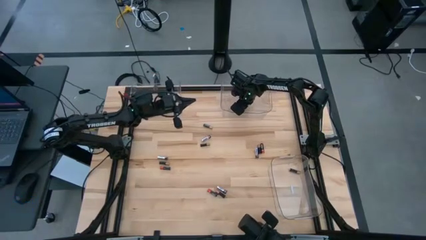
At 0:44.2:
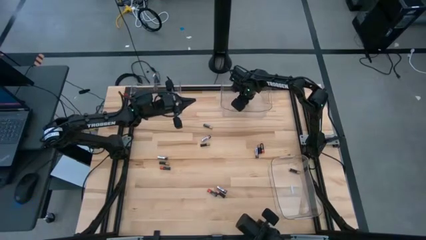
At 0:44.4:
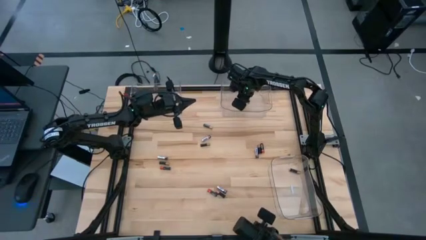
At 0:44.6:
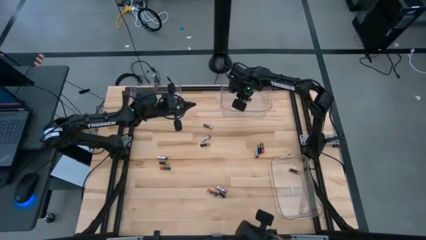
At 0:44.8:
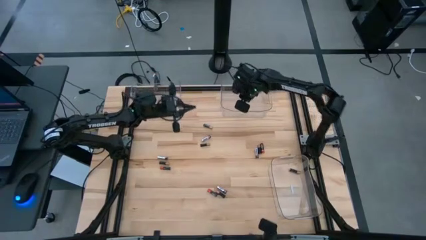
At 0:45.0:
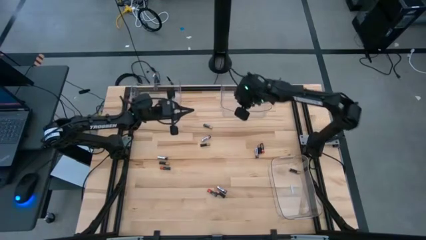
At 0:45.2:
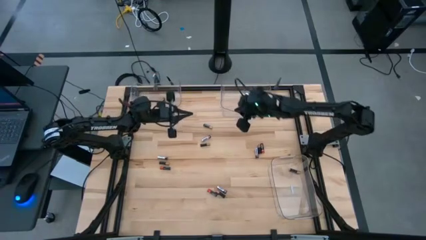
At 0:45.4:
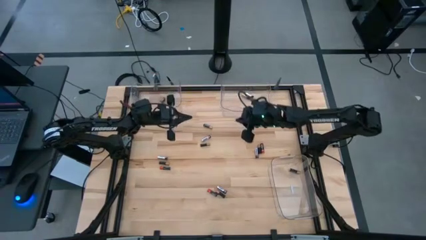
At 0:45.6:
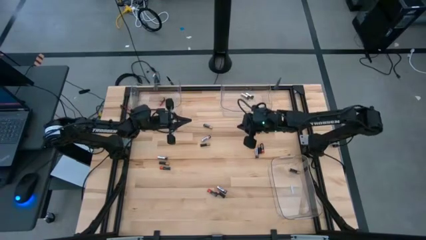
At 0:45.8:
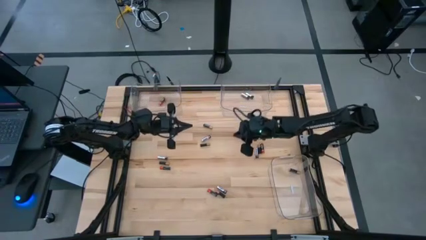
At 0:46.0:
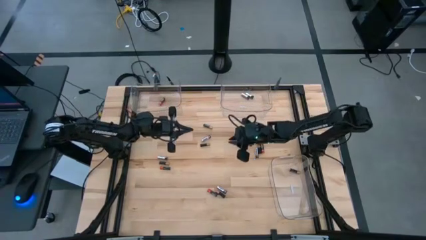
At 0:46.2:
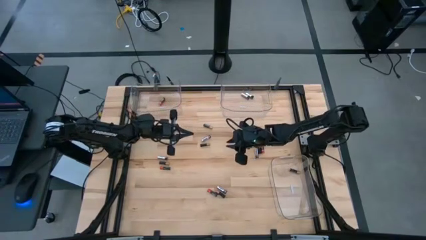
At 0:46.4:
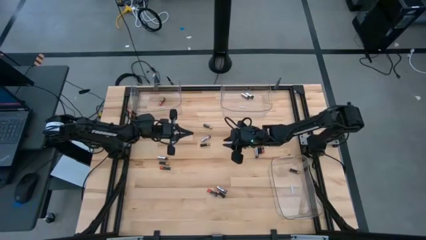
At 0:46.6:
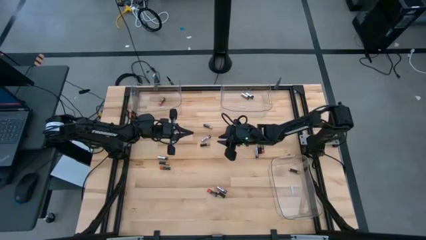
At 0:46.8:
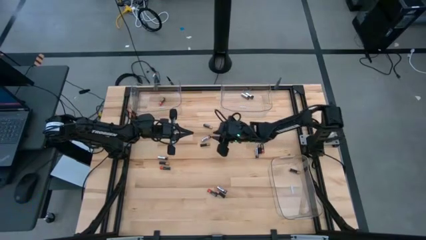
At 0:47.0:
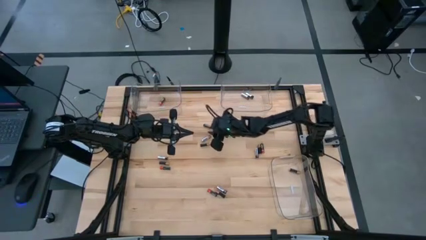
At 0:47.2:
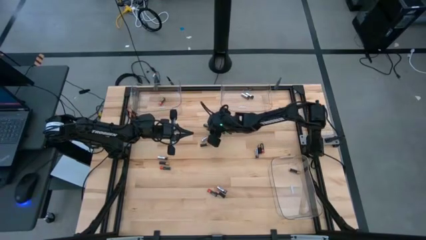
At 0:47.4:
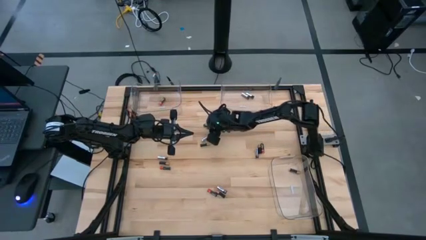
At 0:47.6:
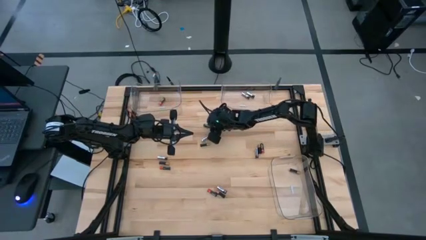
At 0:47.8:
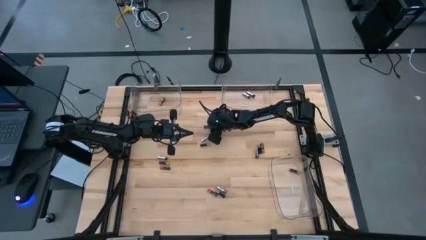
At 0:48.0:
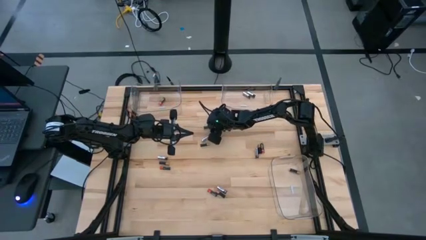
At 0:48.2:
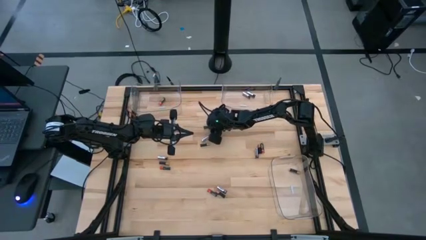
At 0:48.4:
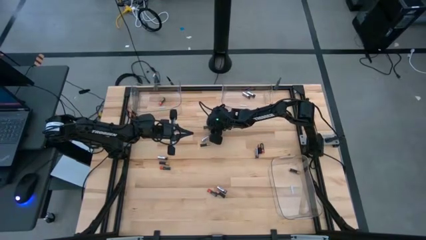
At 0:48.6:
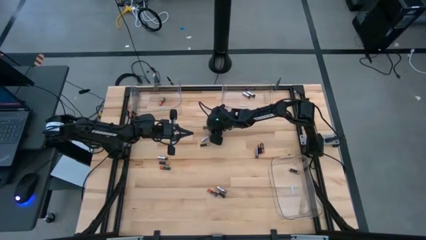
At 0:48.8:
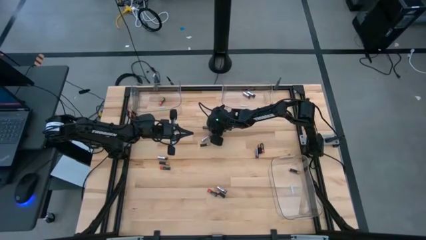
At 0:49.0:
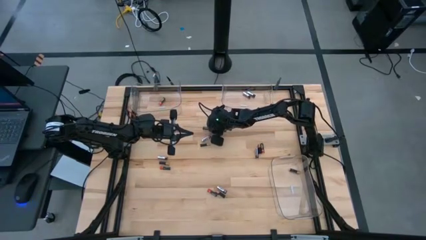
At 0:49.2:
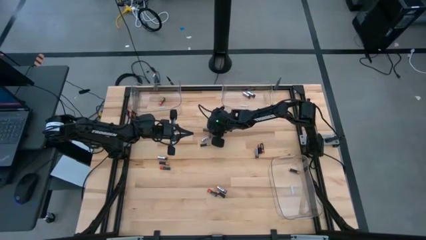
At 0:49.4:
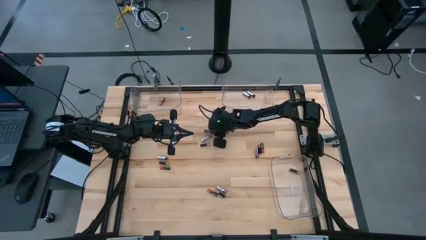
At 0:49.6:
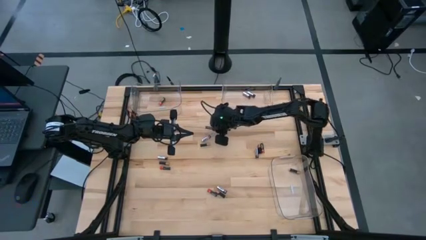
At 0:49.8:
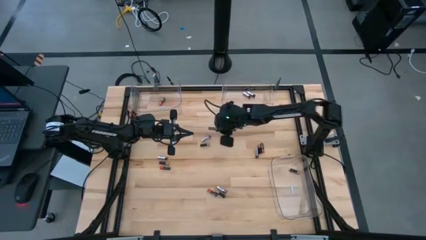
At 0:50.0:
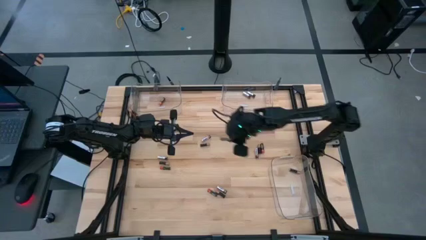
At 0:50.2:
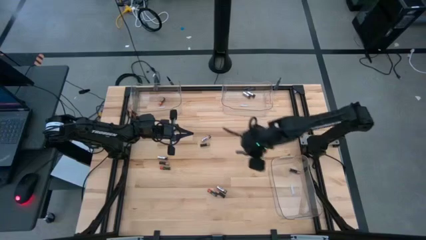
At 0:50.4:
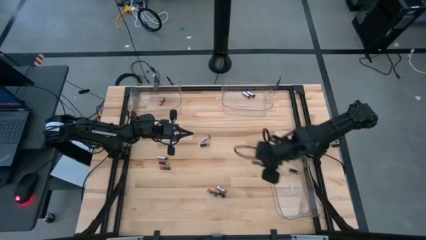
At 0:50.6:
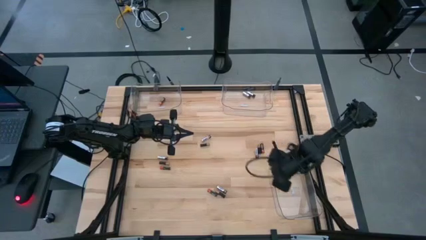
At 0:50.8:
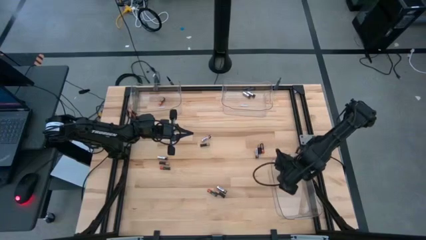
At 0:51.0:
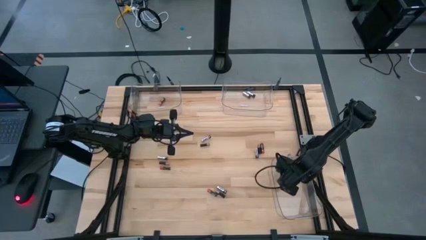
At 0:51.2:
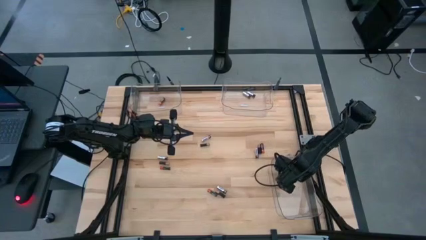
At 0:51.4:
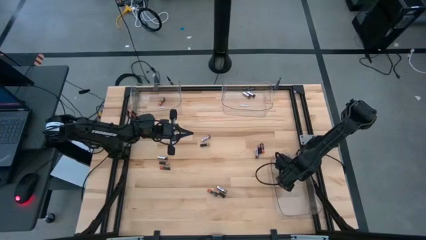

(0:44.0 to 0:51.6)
Task: Sort batteries
Put the brown battery into the bottom right transparent bin

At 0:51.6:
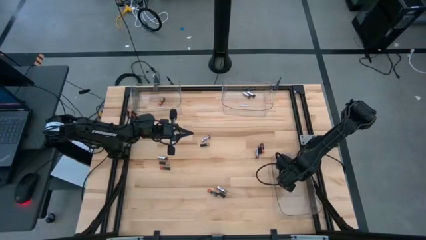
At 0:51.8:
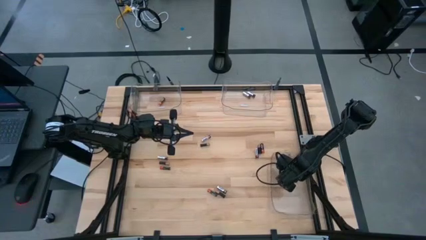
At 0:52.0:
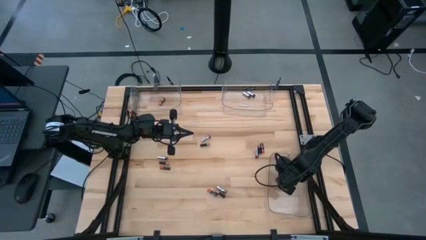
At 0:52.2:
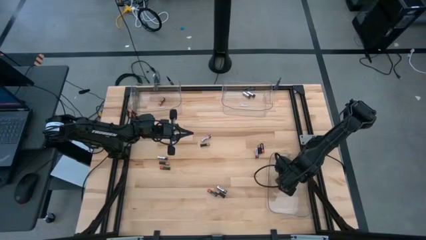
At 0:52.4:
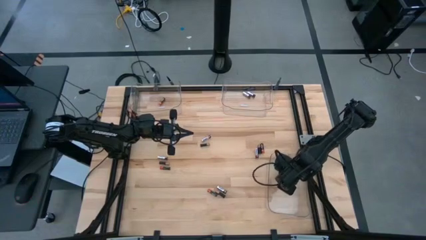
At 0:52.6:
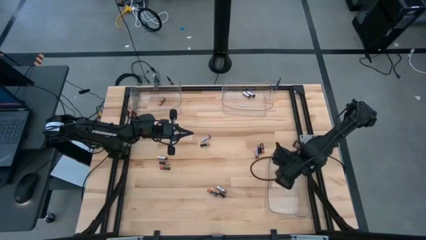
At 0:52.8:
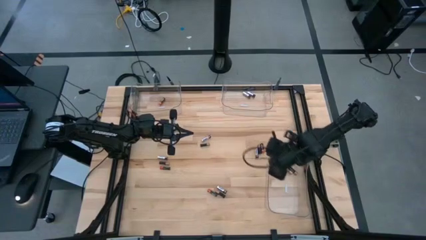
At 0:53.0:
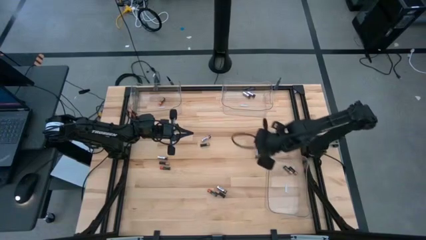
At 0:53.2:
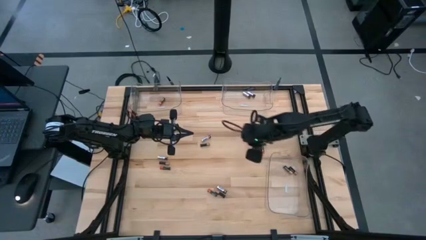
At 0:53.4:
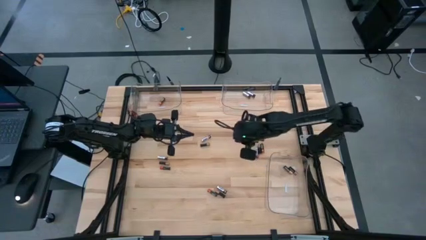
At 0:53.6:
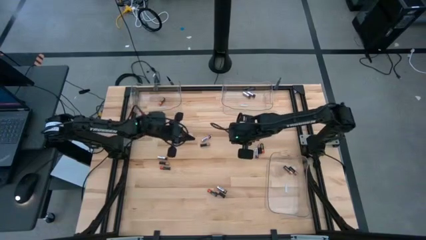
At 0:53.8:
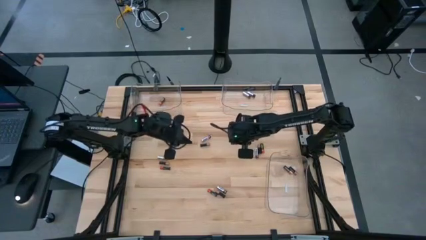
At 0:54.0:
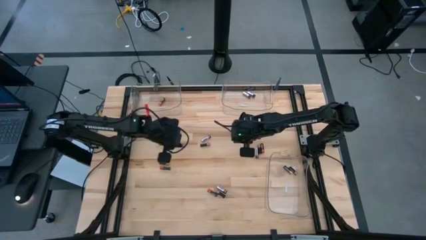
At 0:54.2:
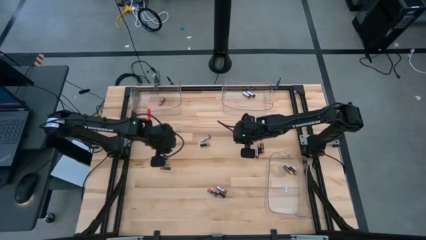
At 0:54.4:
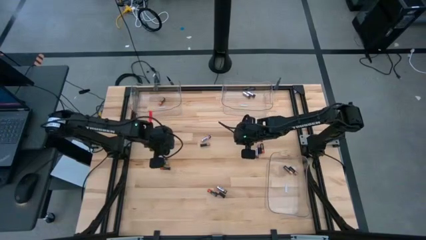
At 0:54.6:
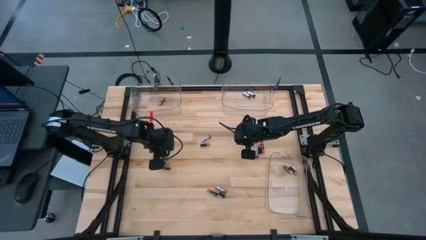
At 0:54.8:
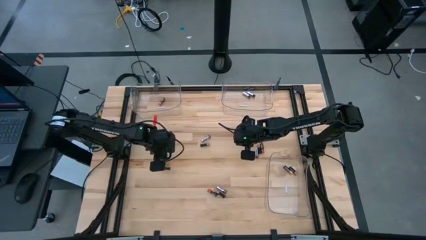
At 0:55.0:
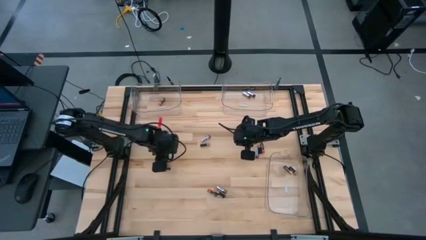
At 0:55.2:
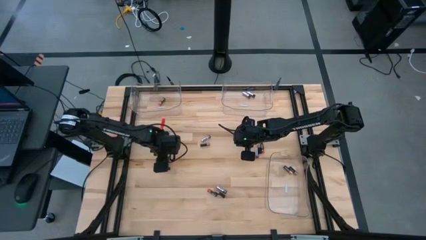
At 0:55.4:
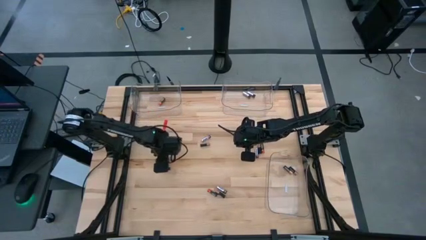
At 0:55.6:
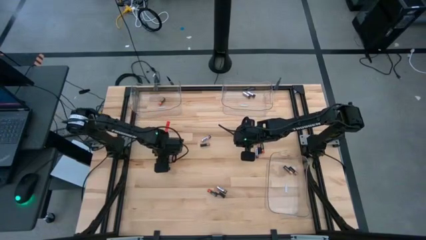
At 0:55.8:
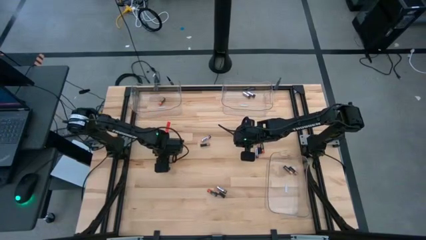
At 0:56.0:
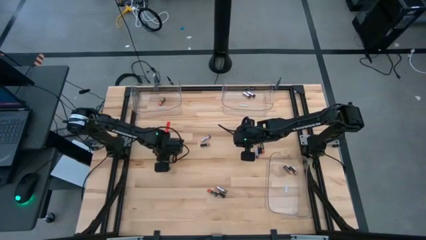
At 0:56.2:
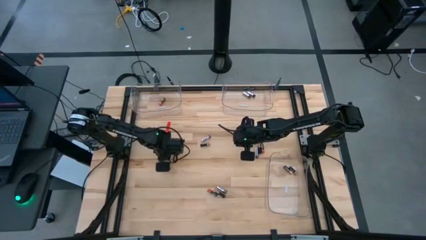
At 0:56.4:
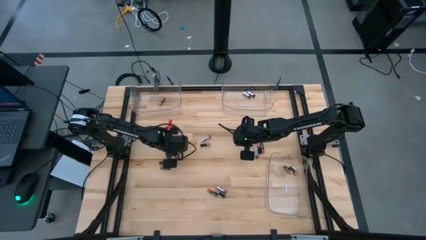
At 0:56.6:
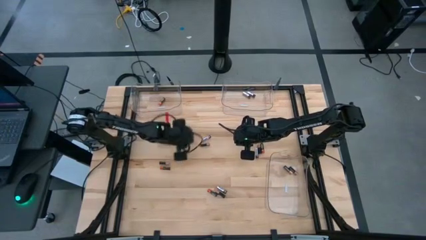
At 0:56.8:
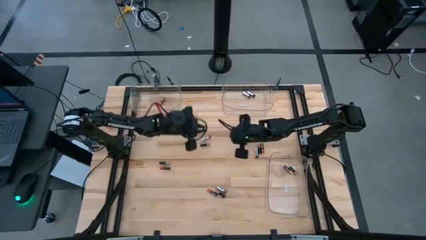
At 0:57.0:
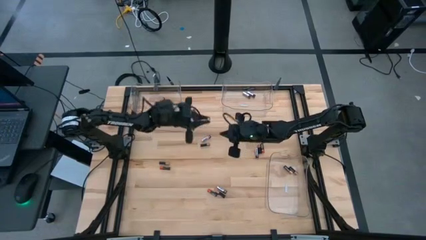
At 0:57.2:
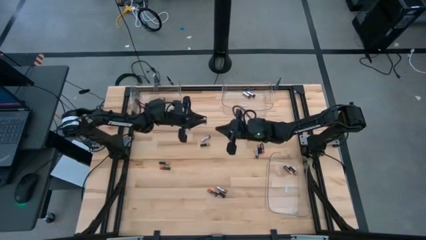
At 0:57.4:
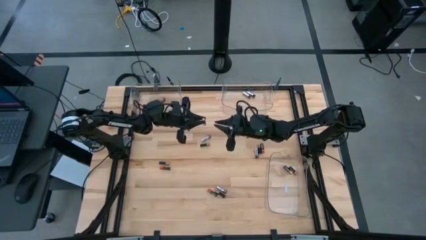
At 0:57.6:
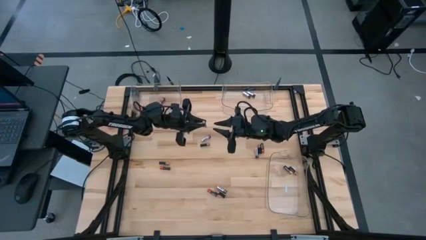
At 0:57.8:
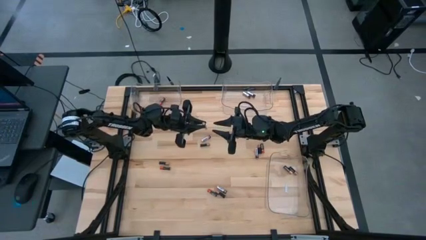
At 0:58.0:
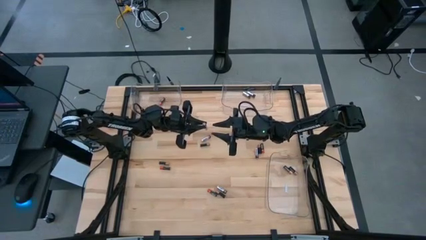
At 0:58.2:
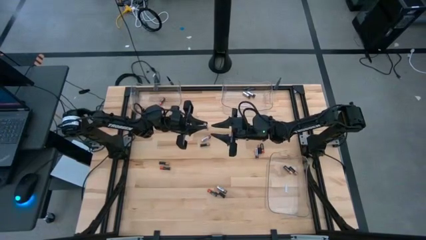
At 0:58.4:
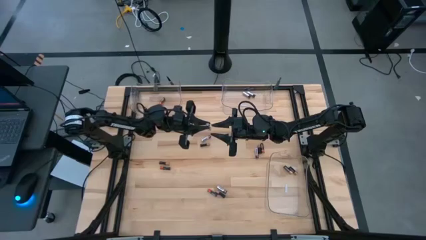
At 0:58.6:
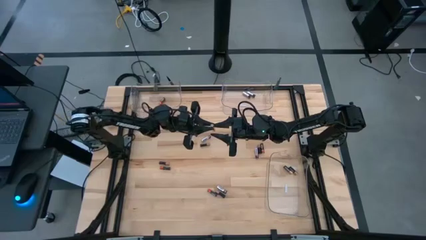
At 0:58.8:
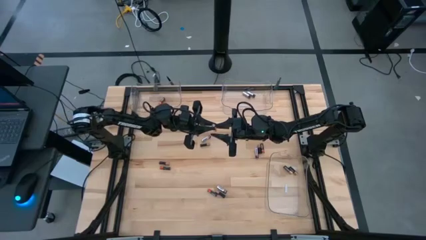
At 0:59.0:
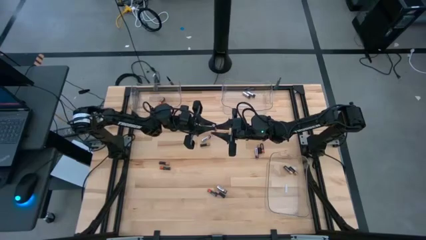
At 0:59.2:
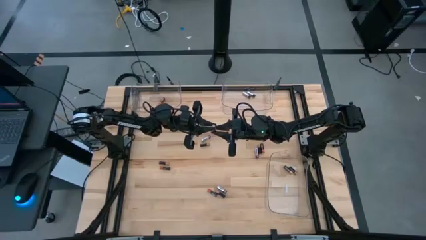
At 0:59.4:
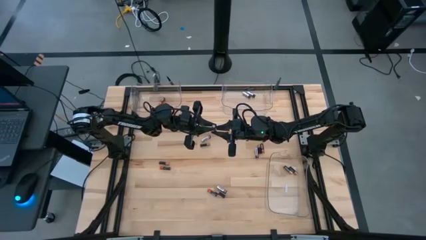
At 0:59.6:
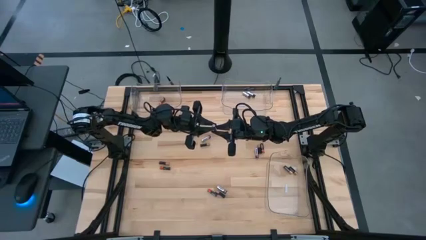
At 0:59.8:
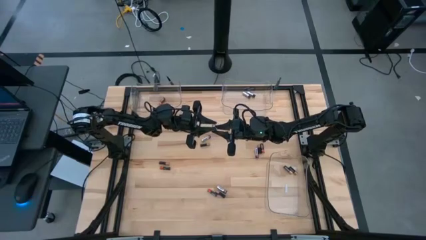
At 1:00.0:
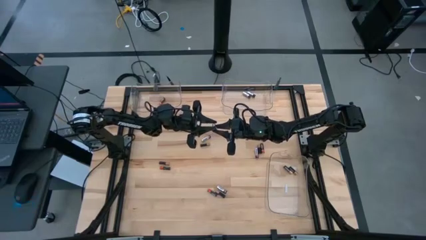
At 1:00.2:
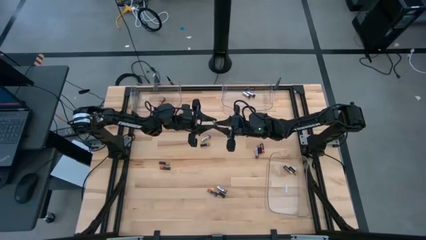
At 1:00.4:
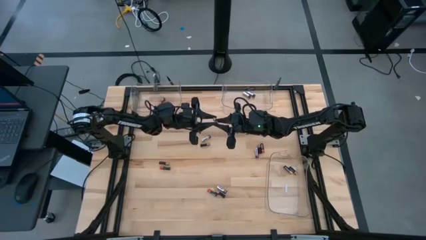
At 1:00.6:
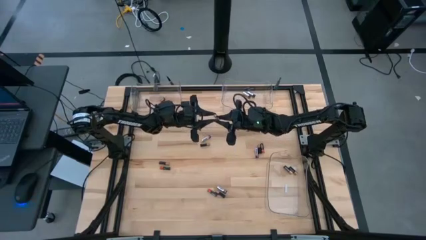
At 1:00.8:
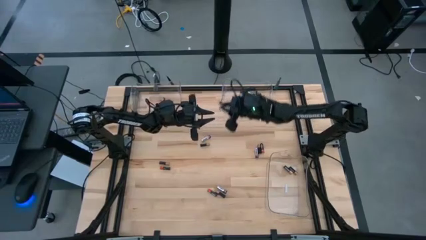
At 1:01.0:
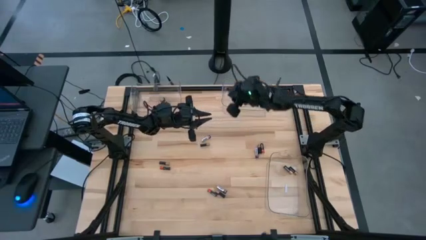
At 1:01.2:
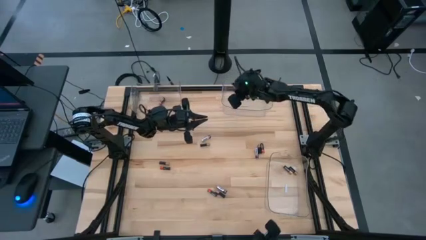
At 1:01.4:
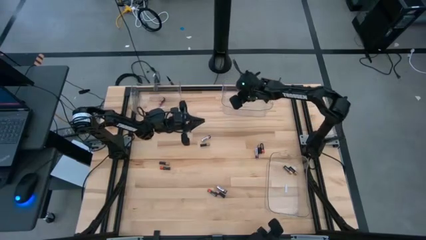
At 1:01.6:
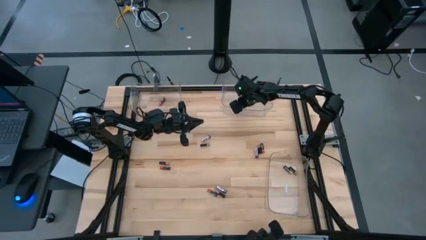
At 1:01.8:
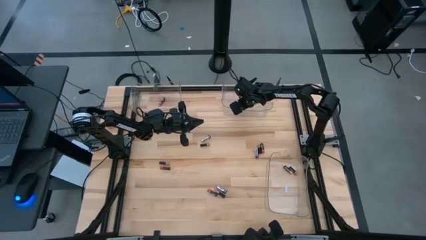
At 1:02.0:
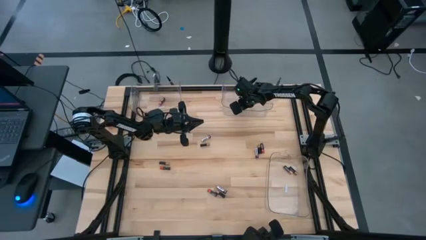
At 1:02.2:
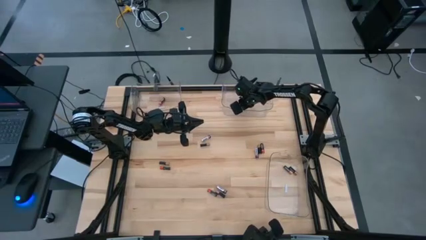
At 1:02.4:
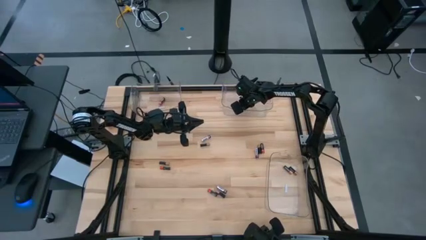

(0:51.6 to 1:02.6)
Put the silver battery into the top right transparent bin
